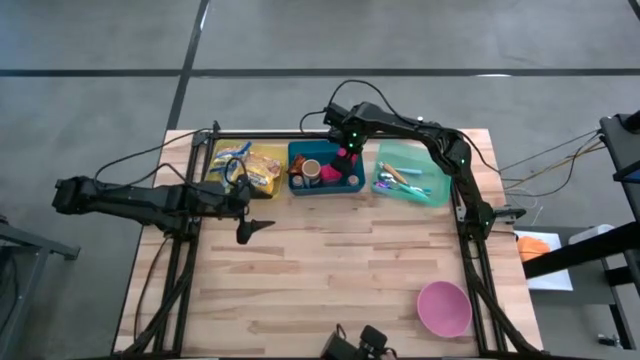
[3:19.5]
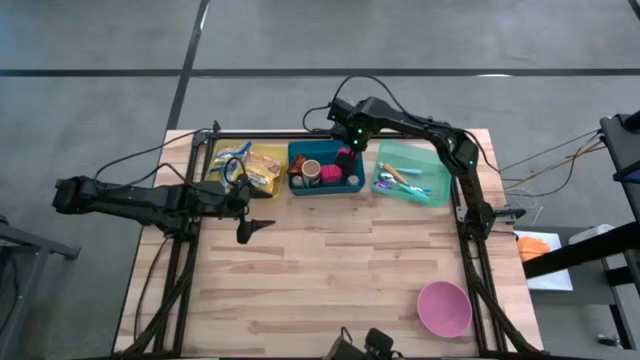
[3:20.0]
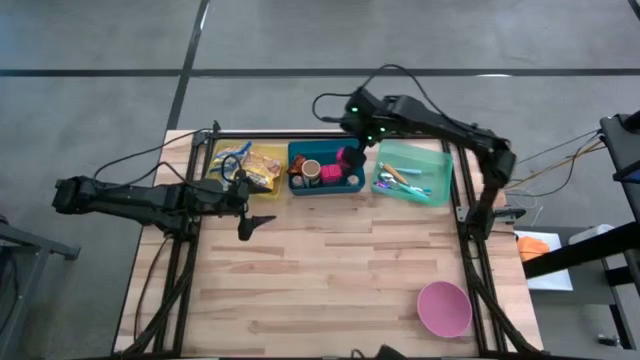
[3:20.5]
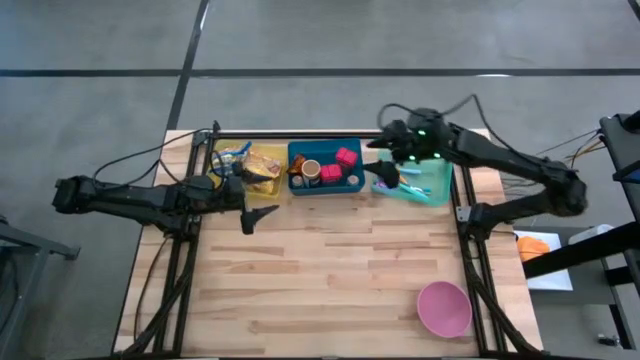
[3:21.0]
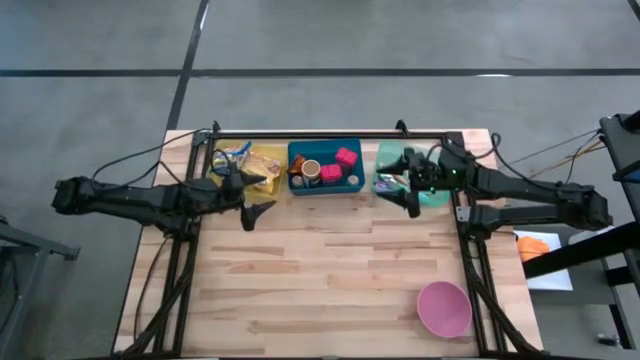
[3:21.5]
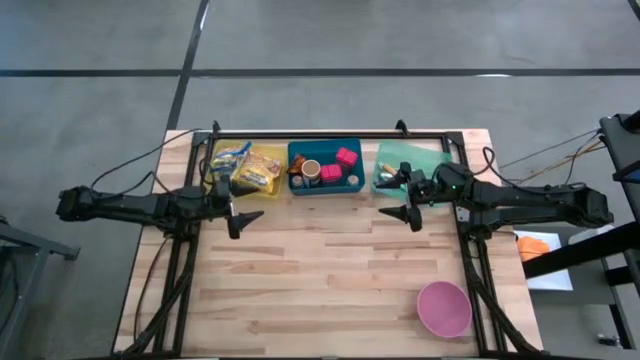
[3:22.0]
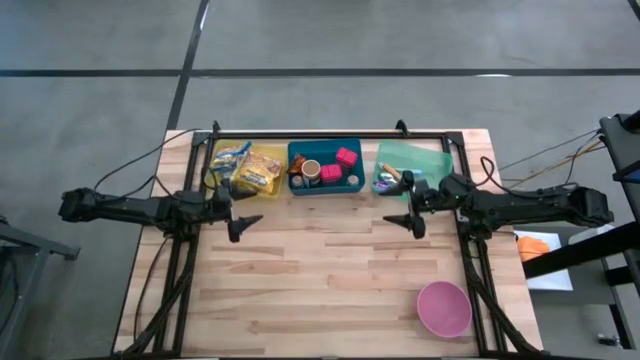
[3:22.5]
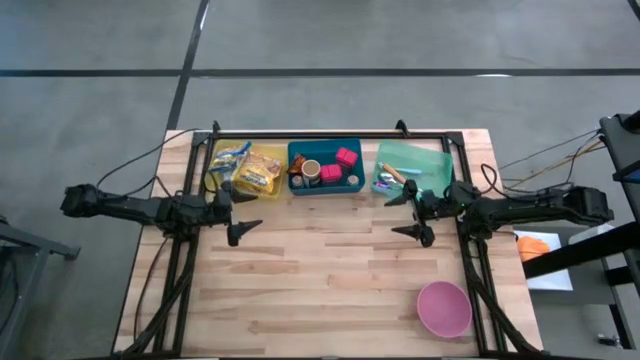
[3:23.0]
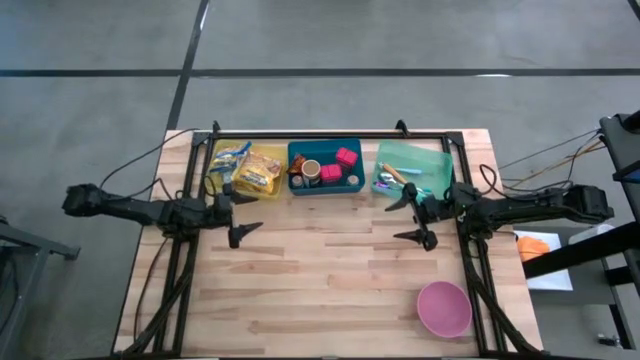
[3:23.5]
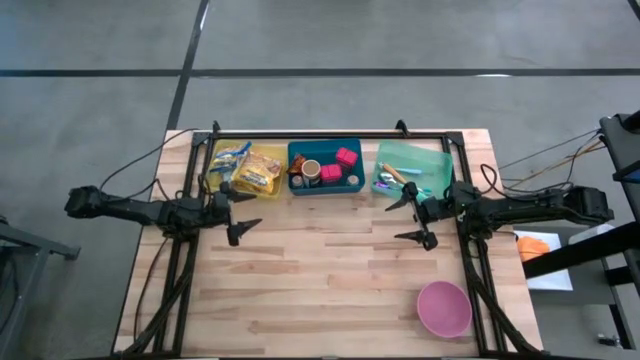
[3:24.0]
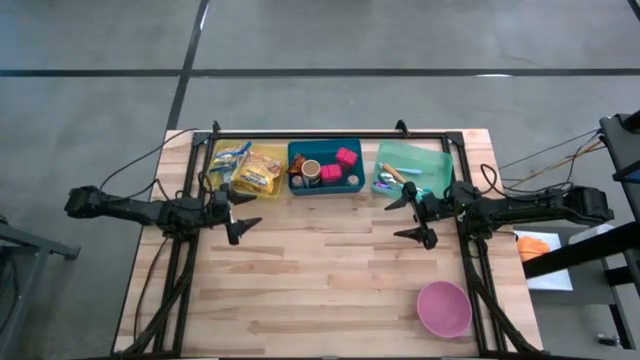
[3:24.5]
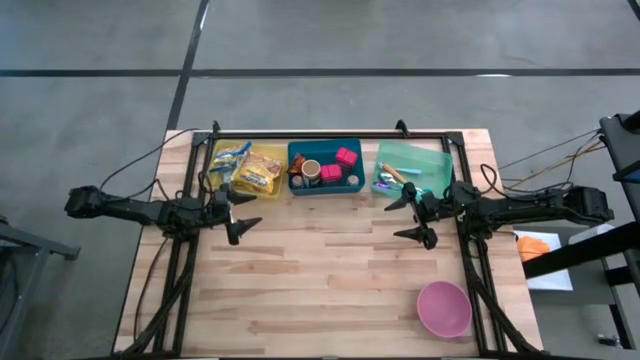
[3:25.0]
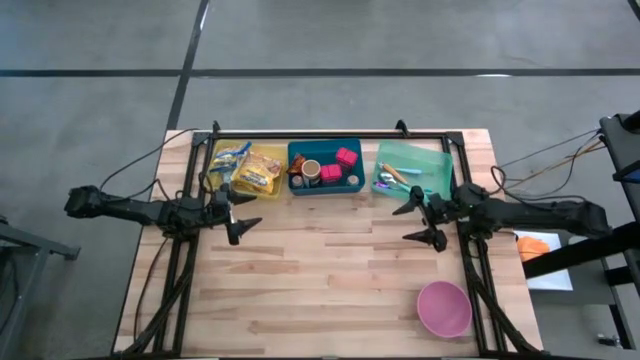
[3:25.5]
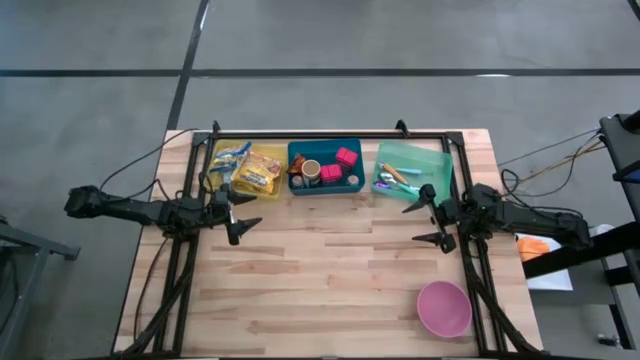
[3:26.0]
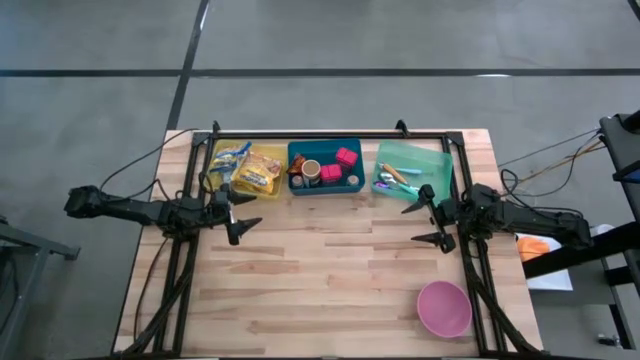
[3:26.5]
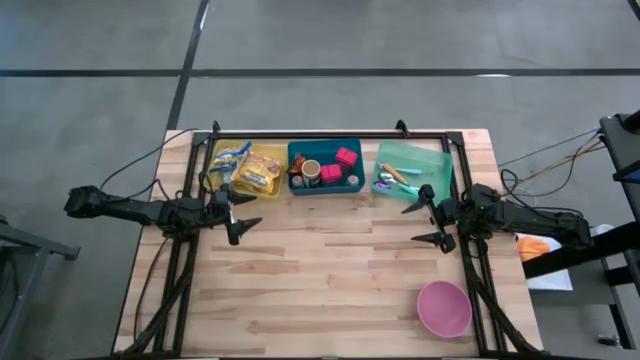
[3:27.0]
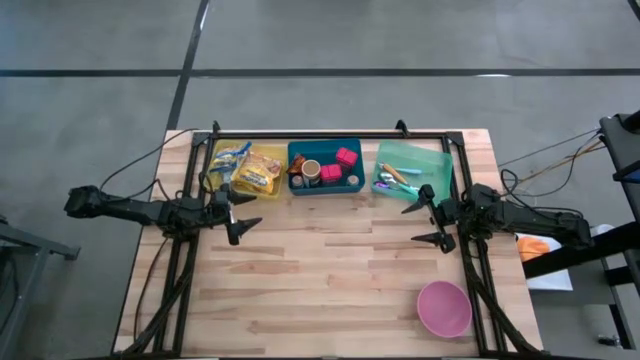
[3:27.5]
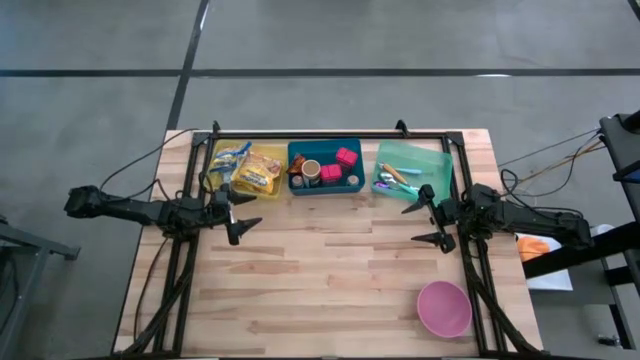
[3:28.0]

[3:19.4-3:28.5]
Return to Home Position

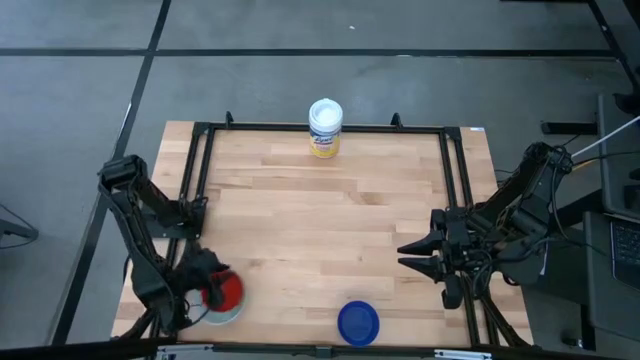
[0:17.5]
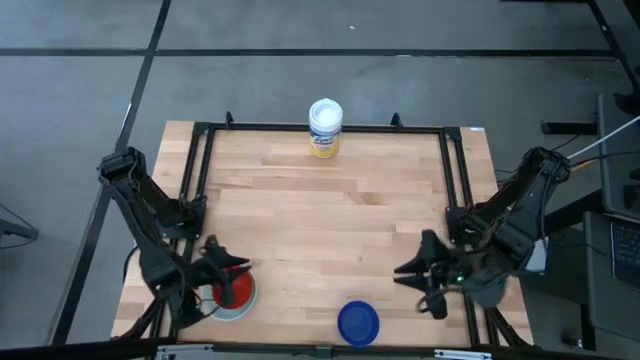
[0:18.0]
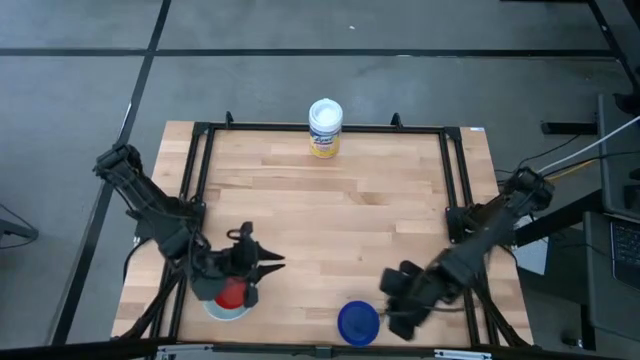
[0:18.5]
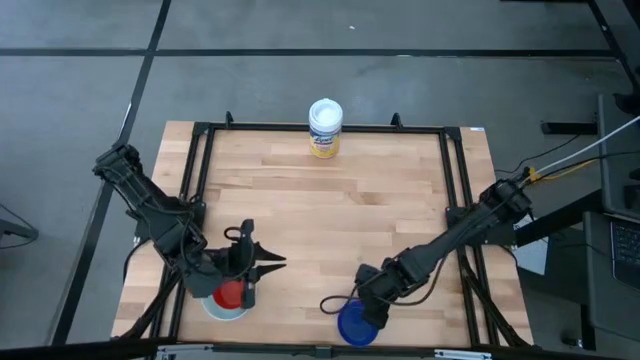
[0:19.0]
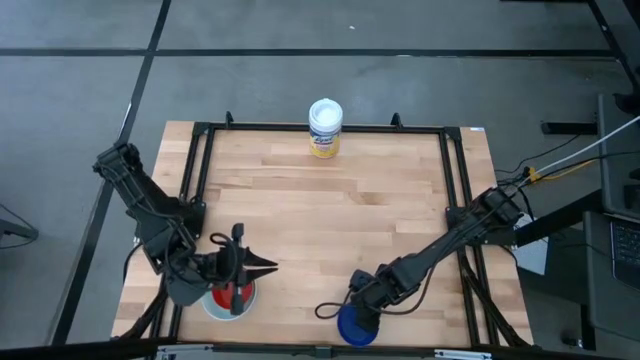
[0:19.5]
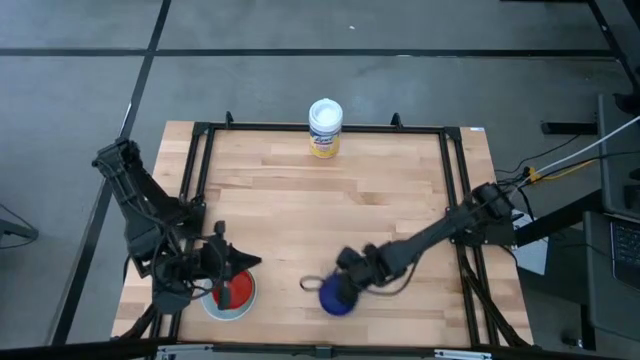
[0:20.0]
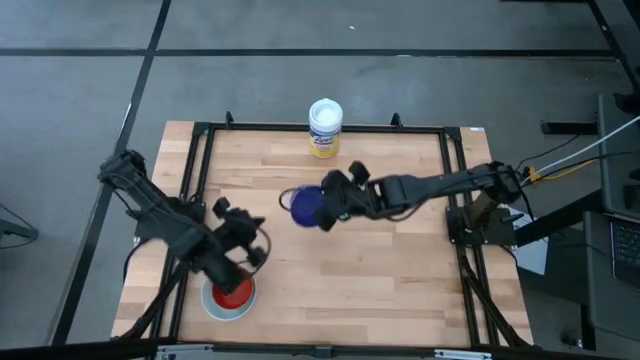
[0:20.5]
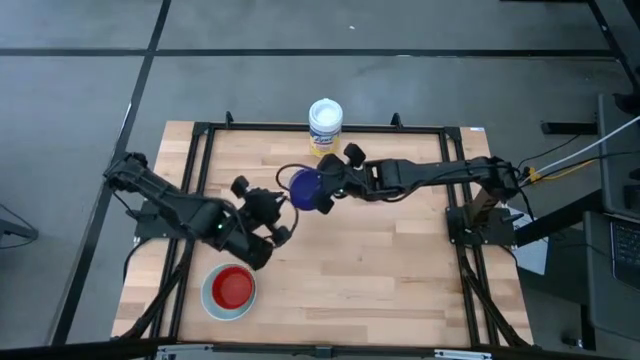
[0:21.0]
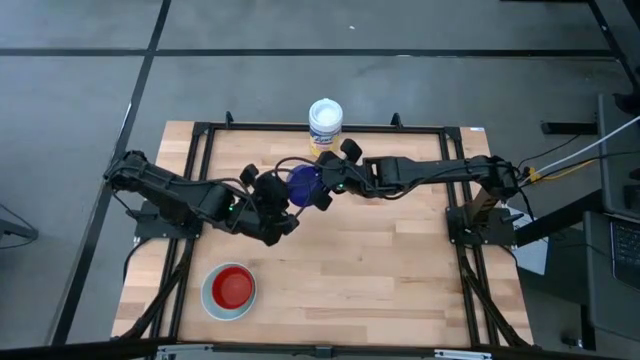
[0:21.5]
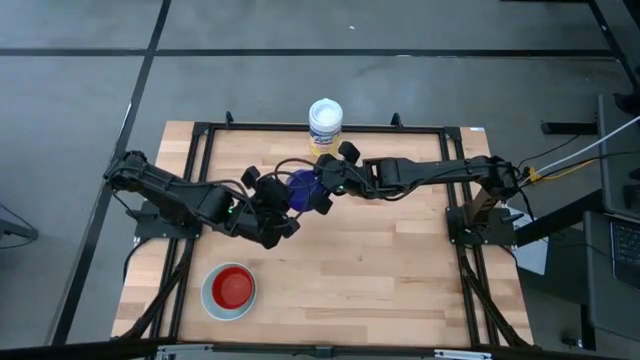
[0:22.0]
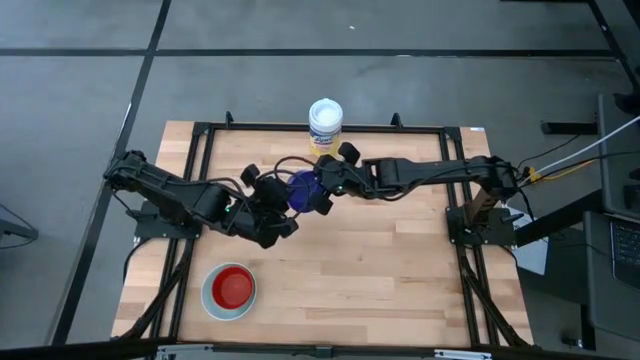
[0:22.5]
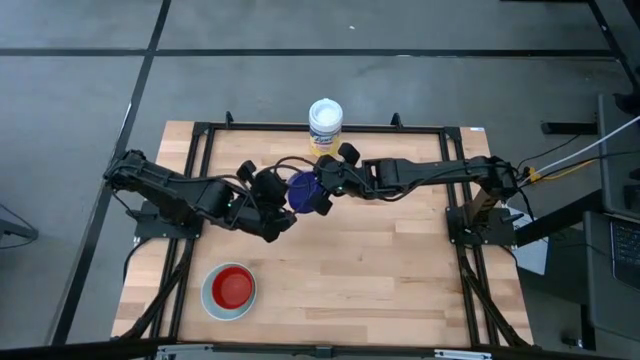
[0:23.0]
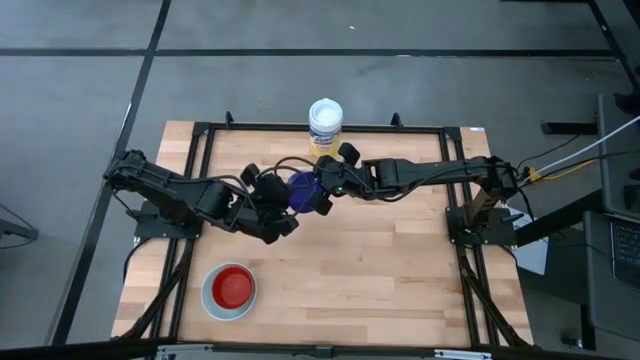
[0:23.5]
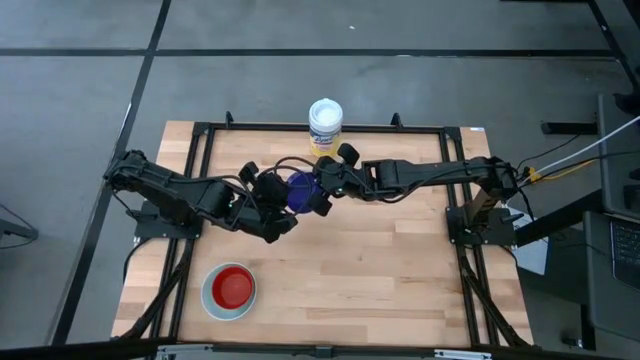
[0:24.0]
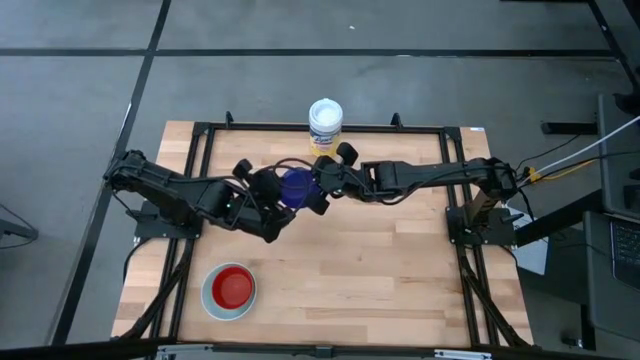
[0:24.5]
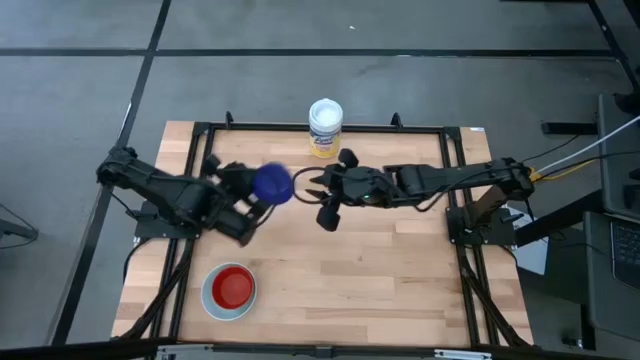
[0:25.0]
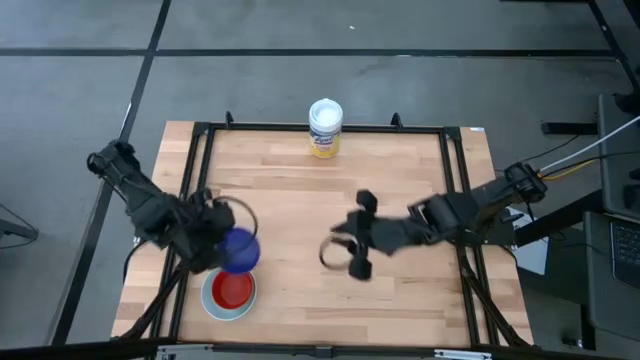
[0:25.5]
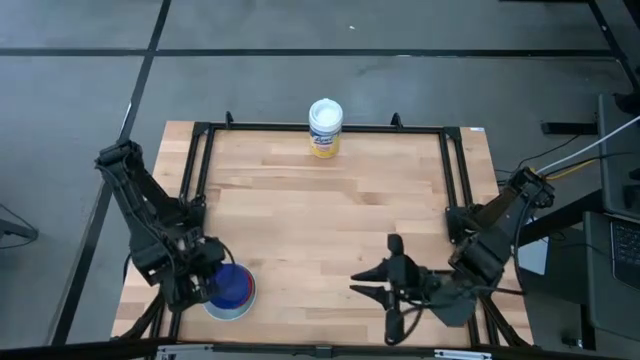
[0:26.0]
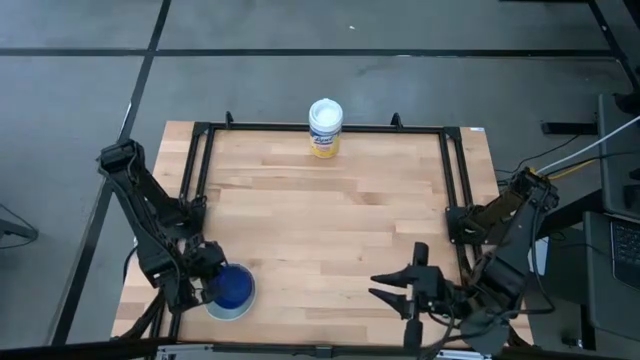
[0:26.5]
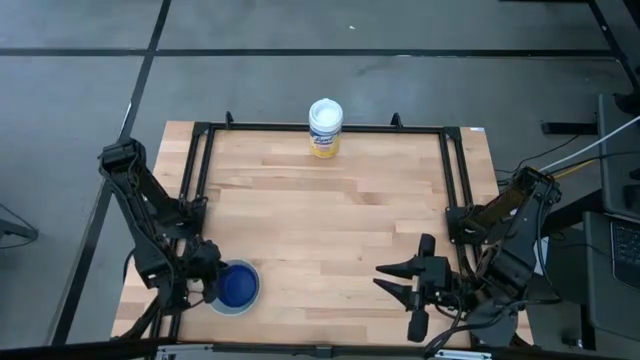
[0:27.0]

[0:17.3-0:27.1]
Stack the blue bowl on top of the red bowl

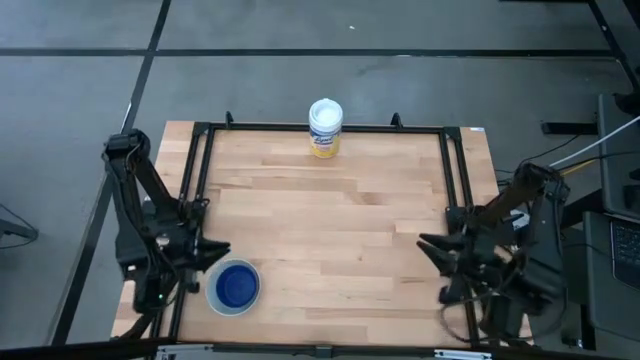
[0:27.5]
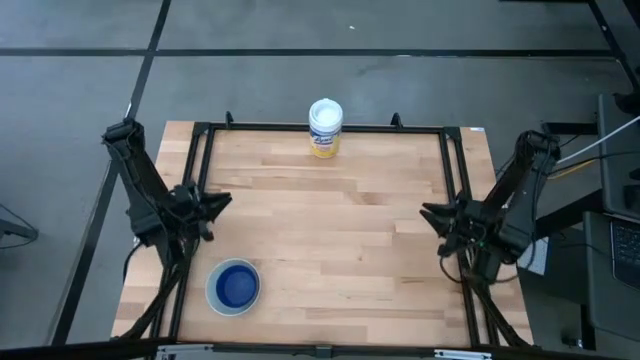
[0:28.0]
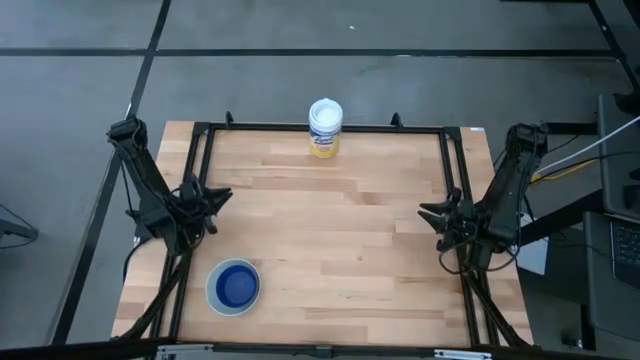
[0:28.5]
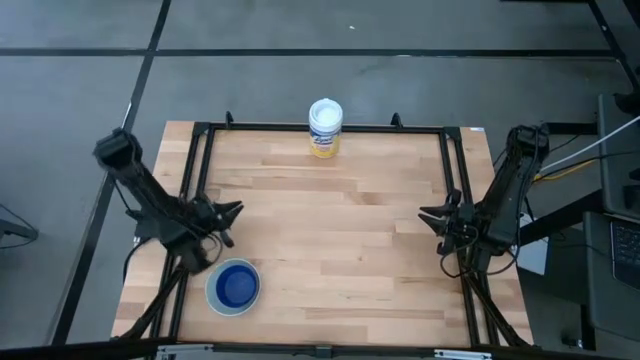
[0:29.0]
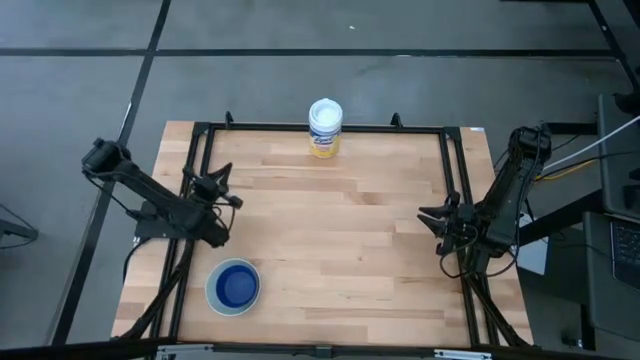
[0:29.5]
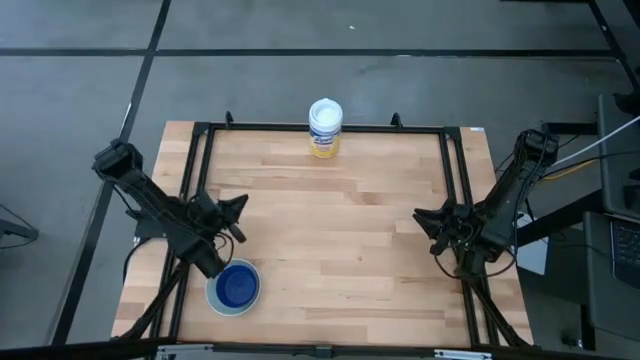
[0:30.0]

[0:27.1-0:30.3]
Return to Home Position
